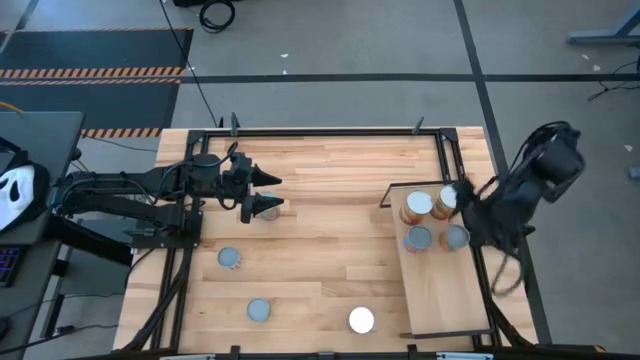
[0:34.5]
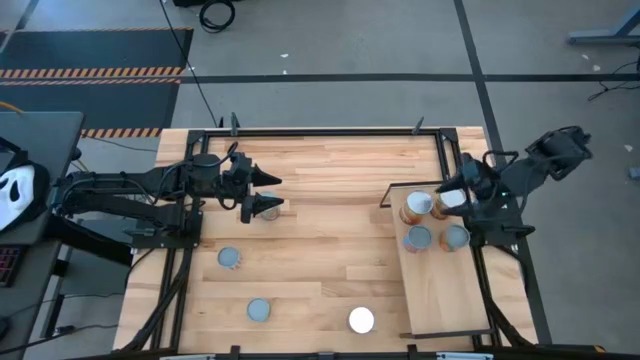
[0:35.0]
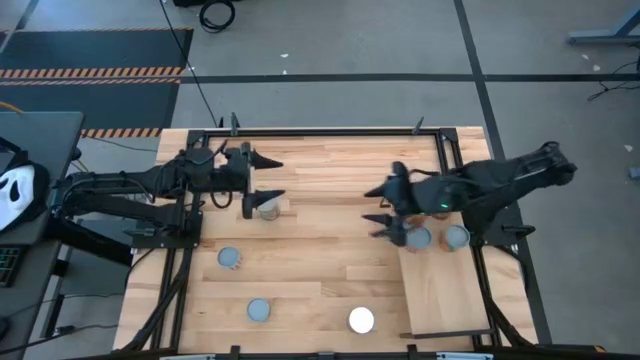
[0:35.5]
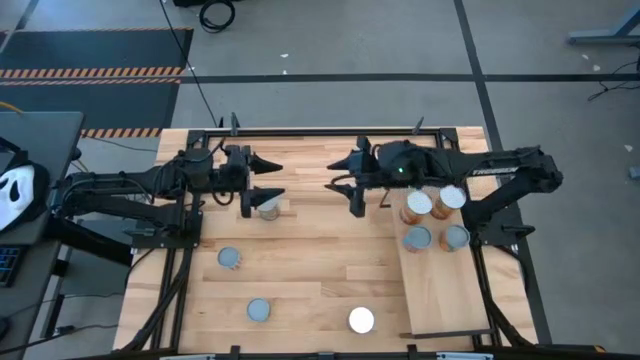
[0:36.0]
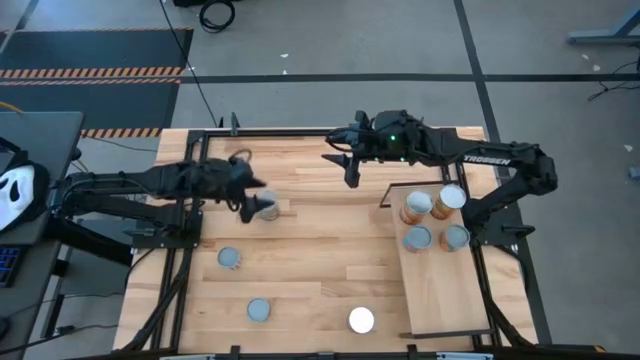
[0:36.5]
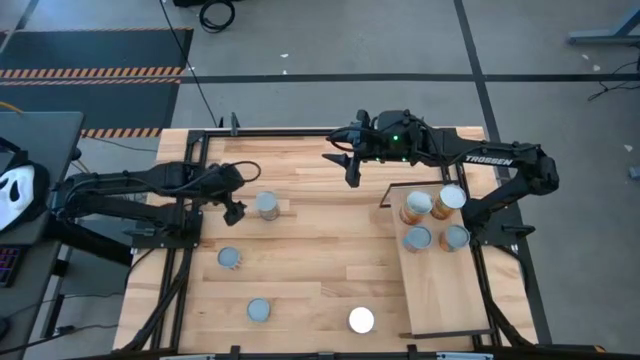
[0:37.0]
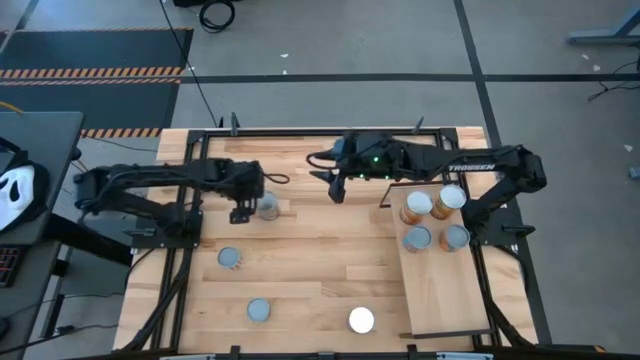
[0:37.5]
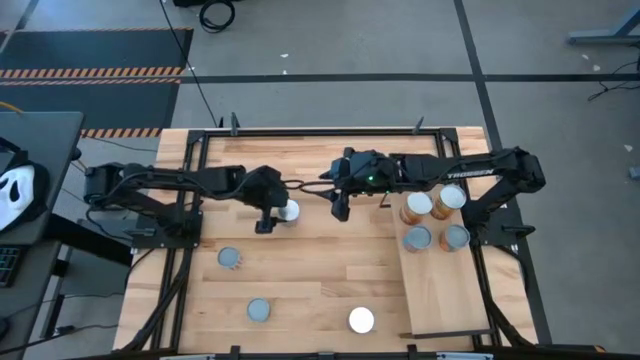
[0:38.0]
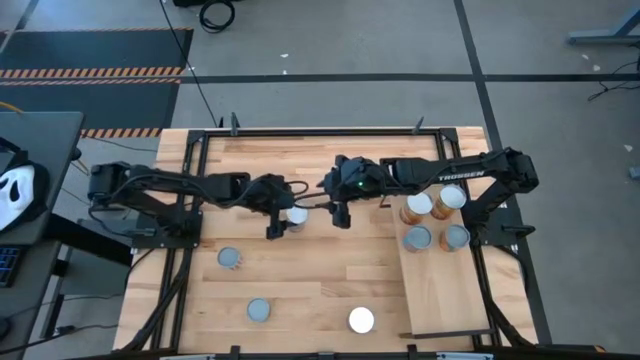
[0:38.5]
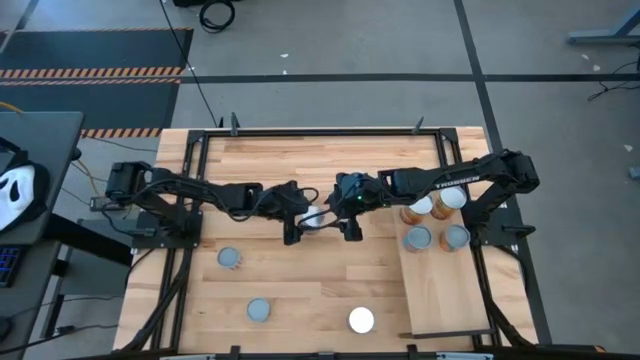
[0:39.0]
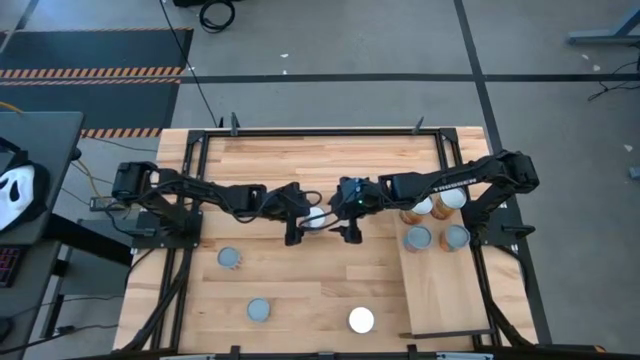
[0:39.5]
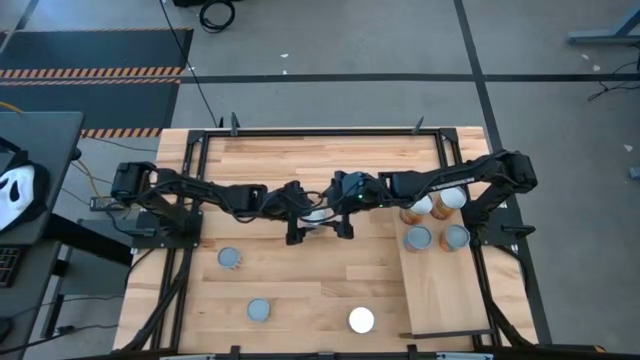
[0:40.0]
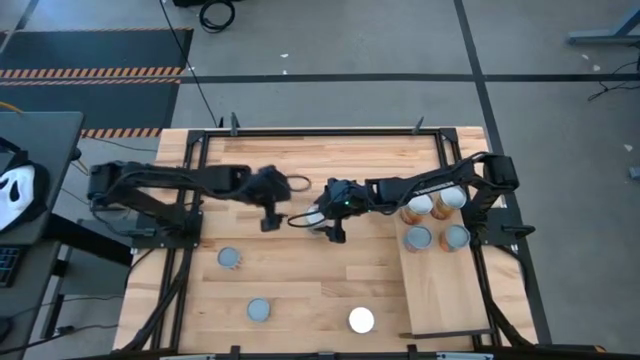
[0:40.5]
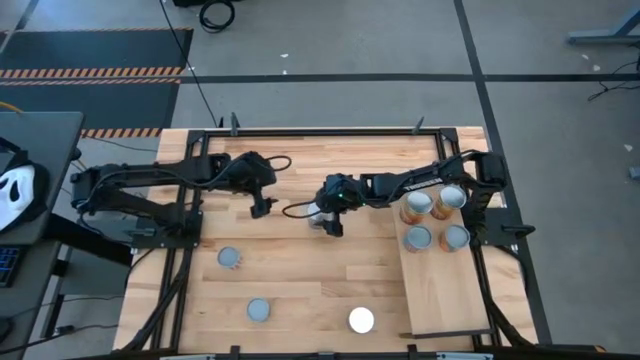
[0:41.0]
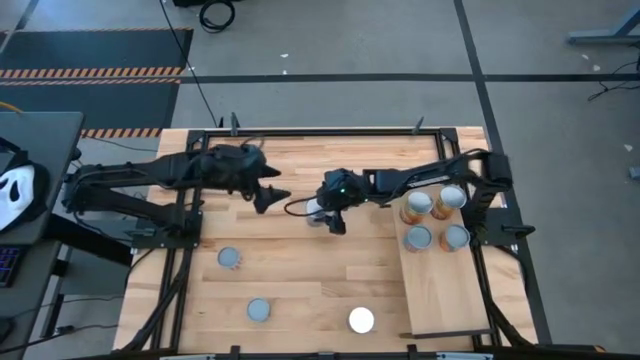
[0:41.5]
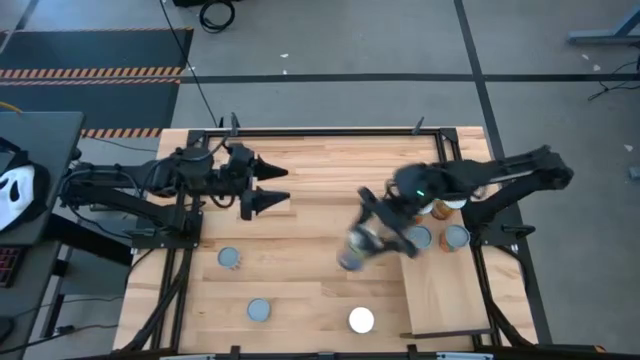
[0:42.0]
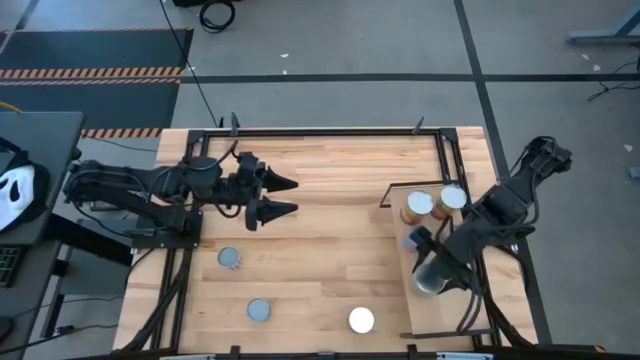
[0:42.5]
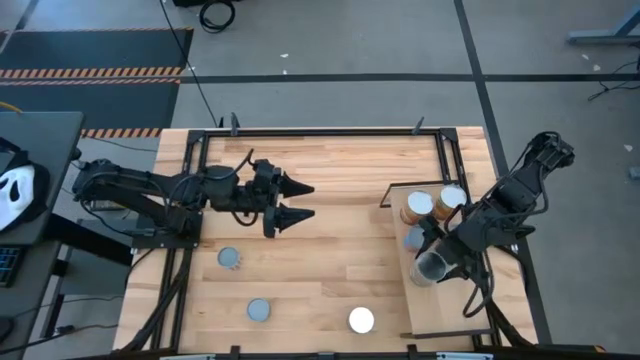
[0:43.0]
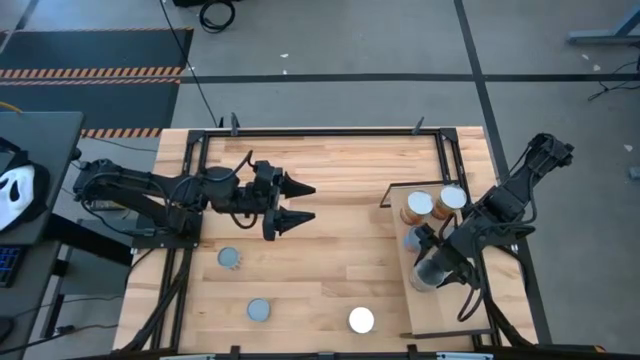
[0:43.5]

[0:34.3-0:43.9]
Task: Pick and place cans onto a shelf
Put the top canned peaches the shelf

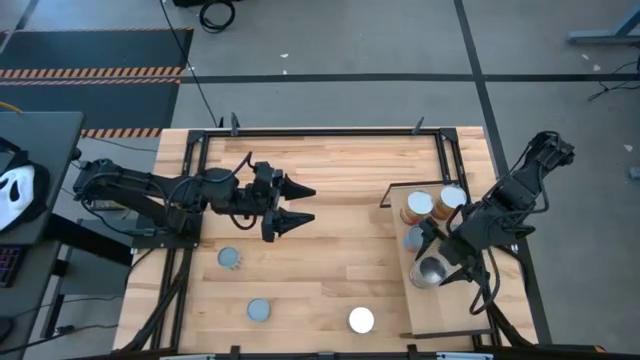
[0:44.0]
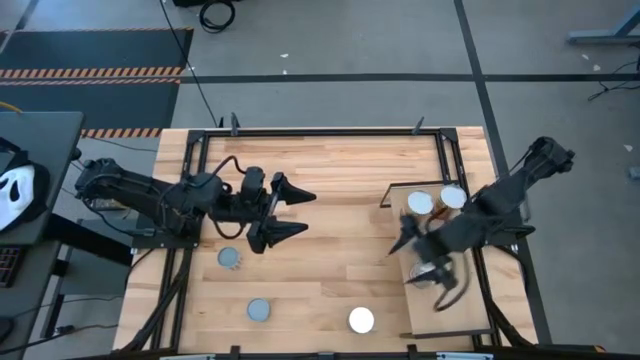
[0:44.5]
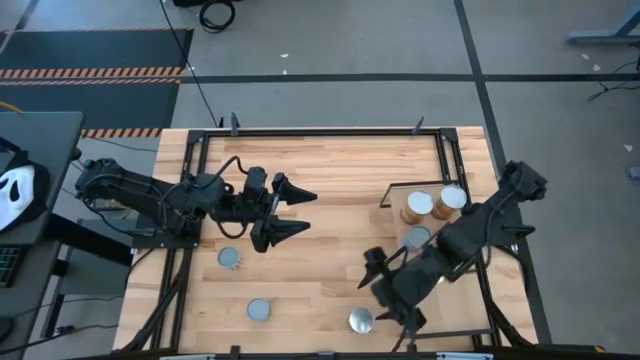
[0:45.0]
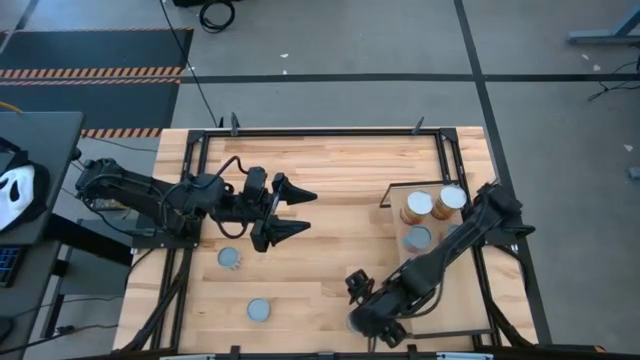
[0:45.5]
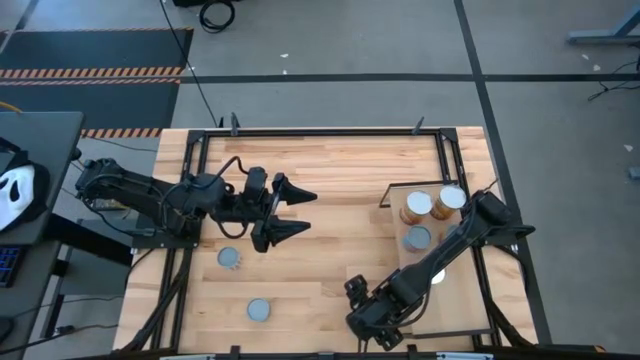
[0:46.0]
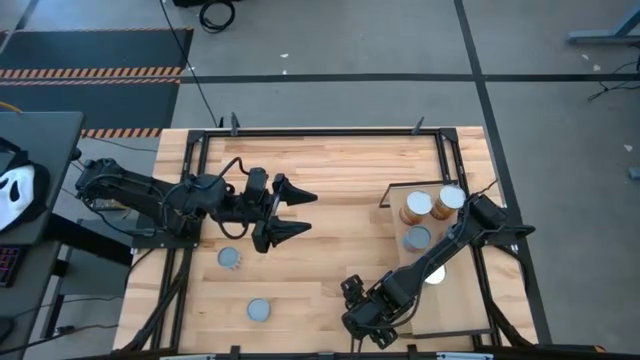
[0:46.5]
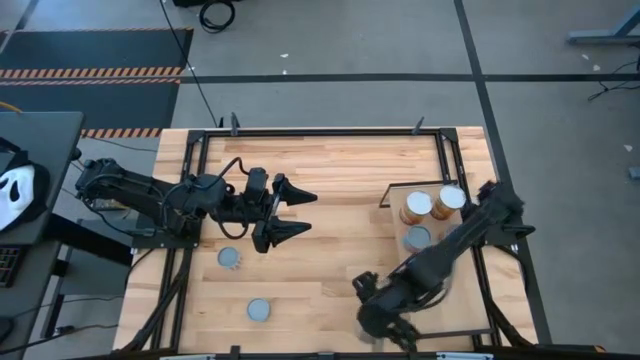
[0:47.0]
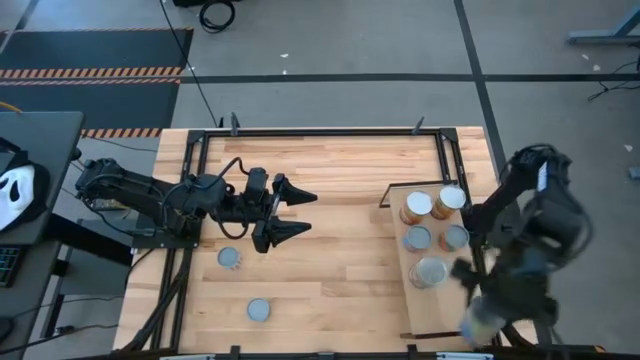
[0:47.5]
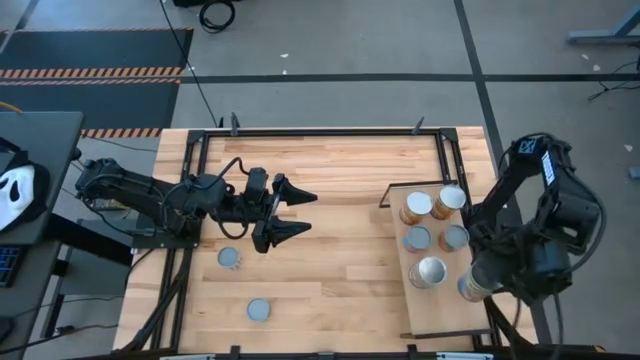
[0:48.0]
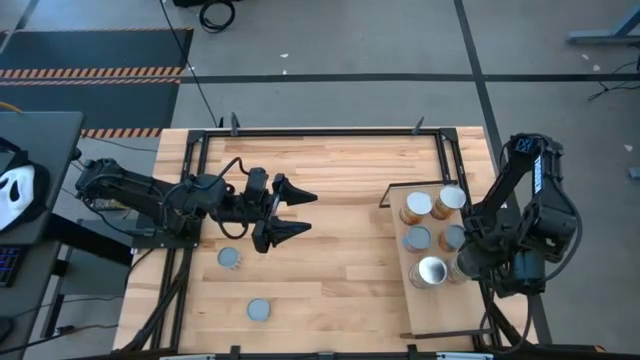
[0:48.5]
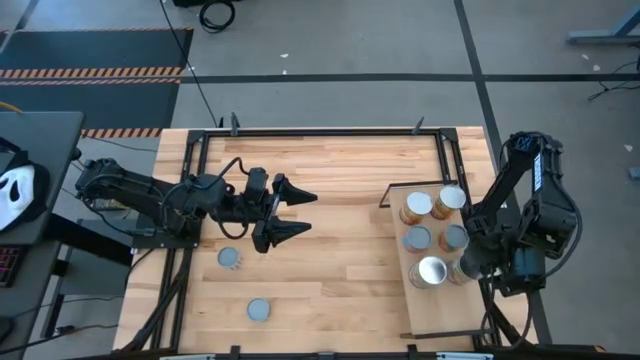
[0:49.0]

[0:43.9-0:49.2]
Put the canned peaches on the shelf aligned with the other canned peaches

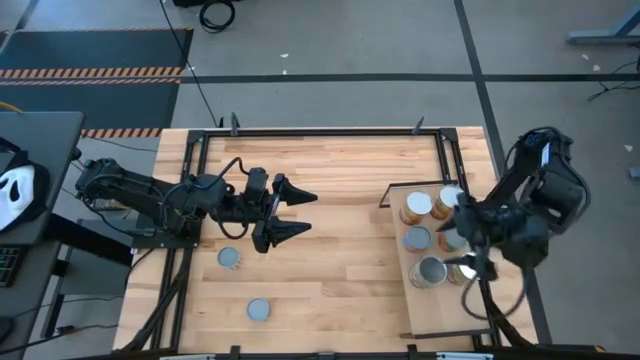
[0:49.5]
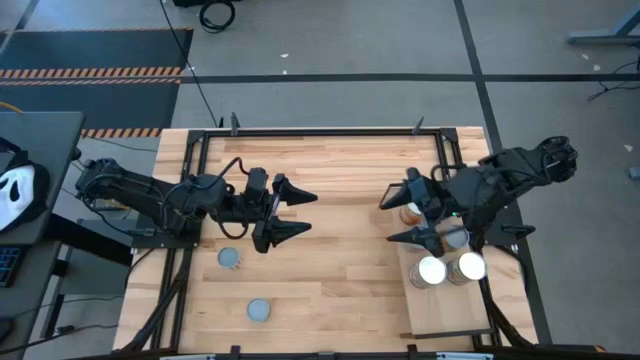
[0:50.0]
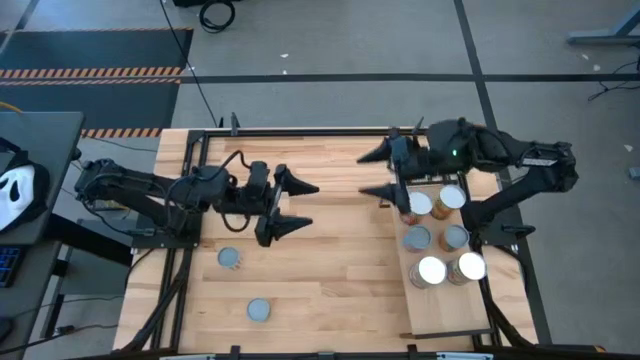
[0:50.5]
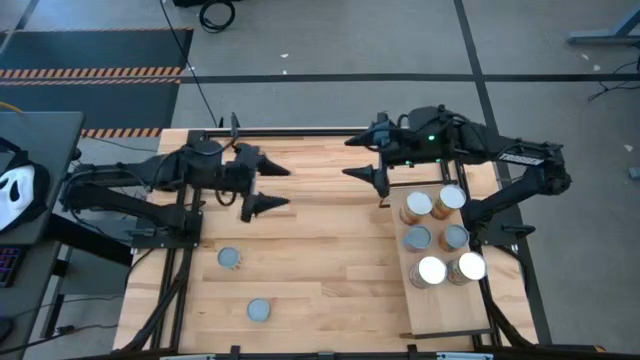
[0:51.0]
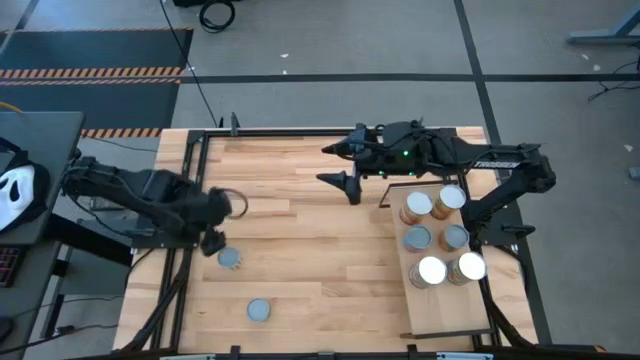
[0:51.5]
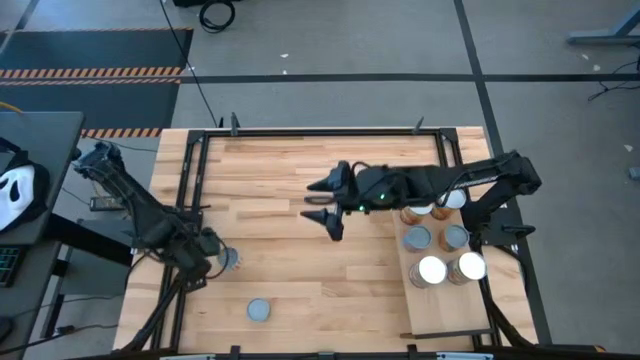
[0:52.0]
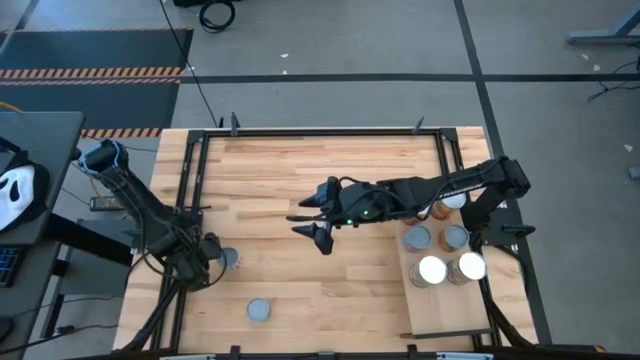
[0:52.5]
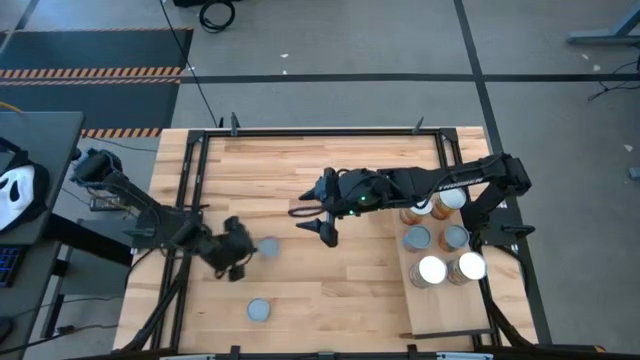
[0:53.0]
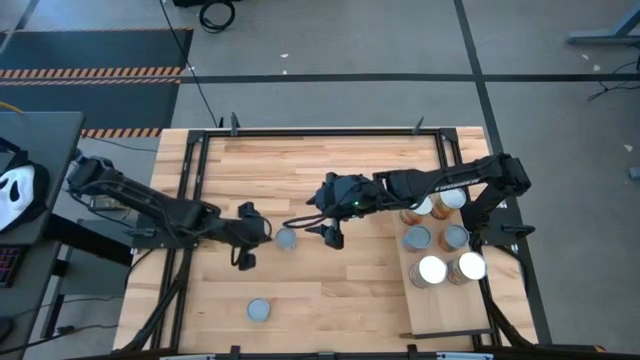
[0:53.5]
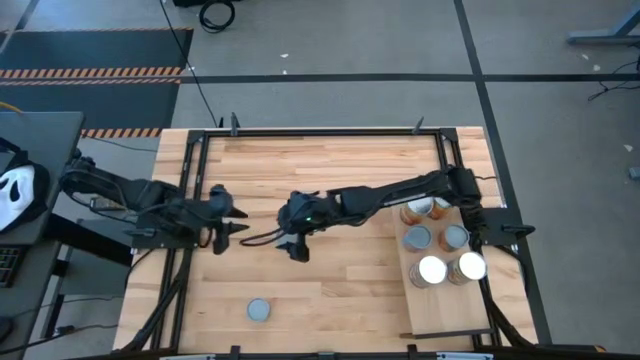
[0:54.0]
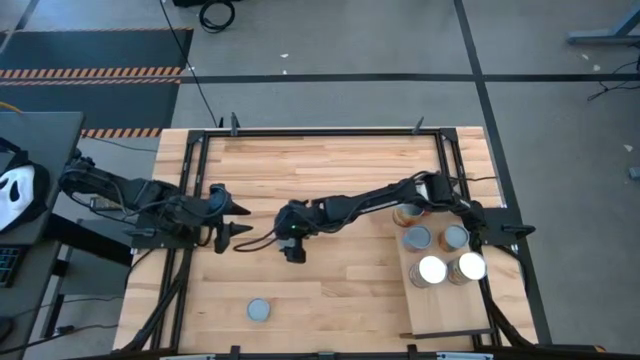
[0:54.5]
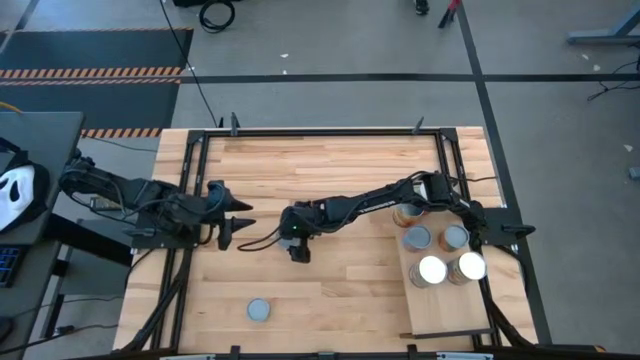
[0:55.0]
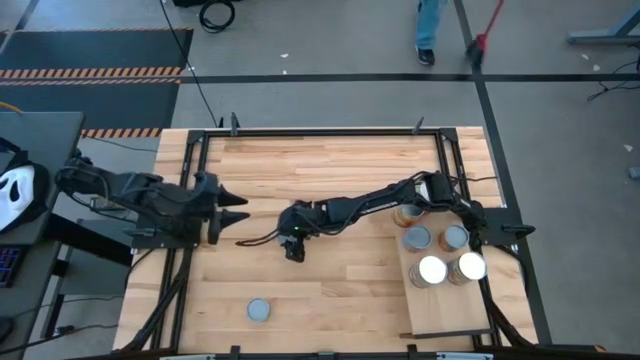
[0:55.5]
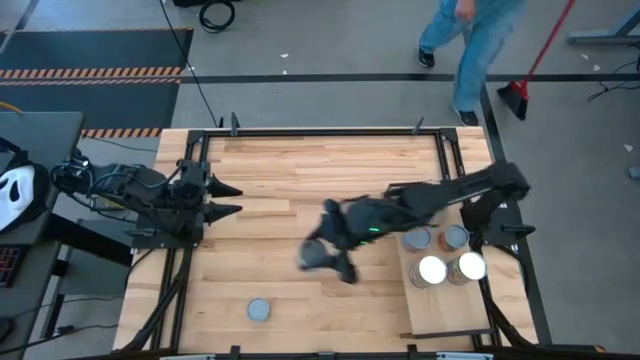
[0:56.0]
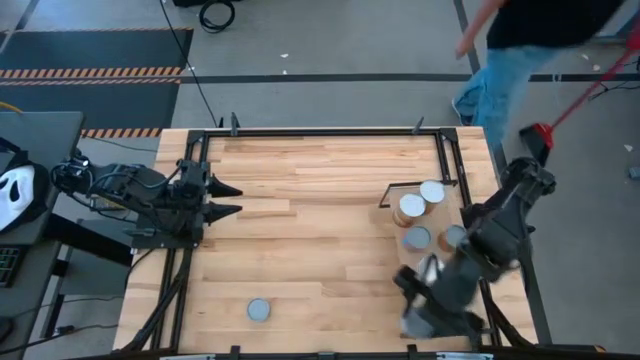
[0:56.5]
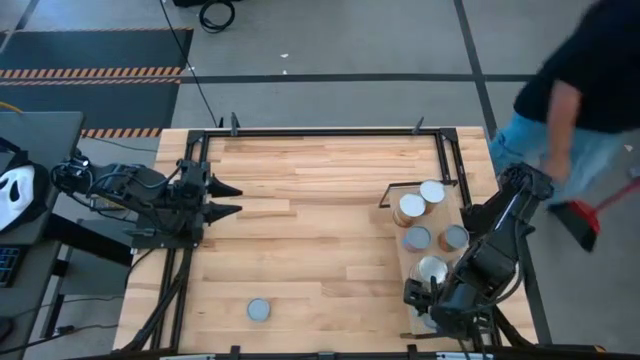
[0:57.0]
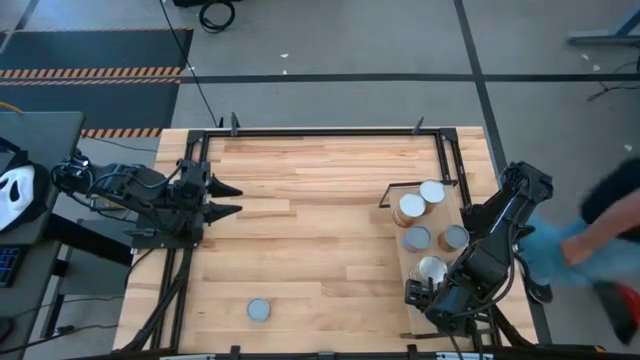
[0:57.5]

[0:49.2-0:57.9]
Put the canned sliced carrots on the shelf
